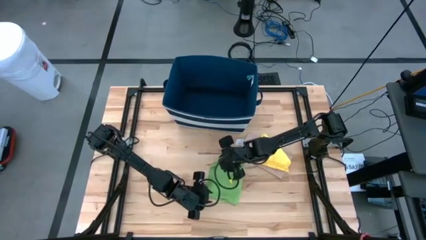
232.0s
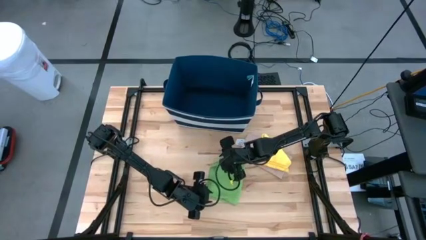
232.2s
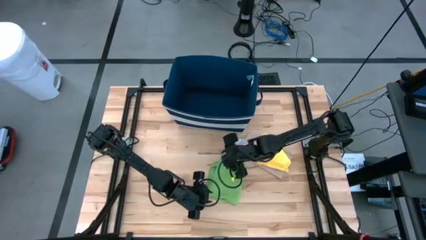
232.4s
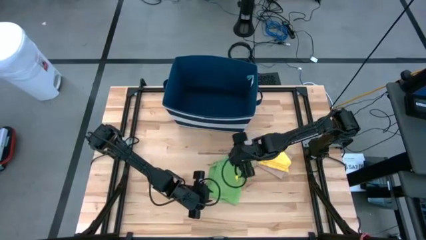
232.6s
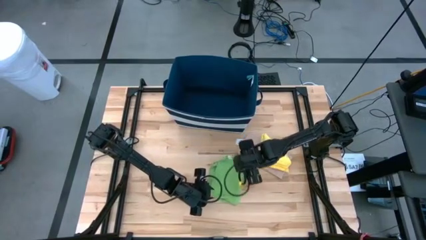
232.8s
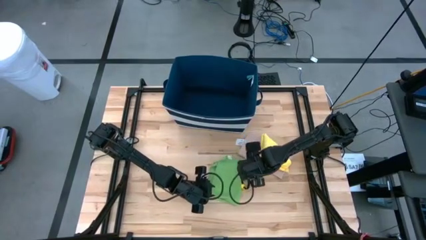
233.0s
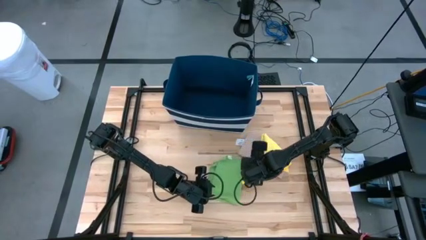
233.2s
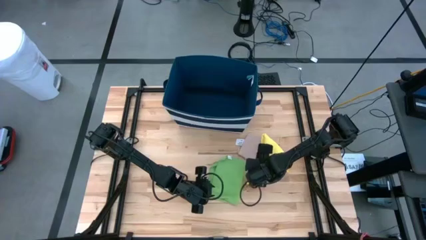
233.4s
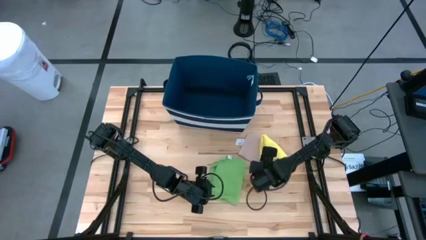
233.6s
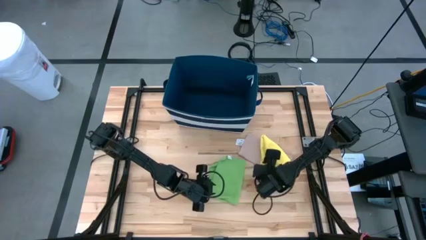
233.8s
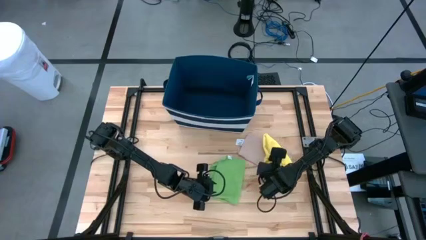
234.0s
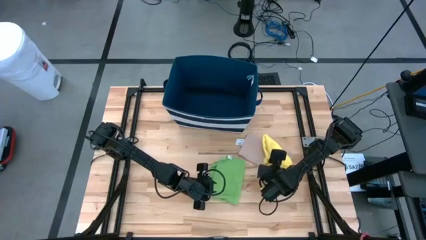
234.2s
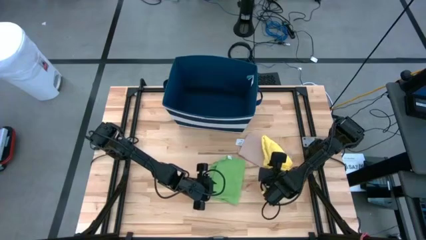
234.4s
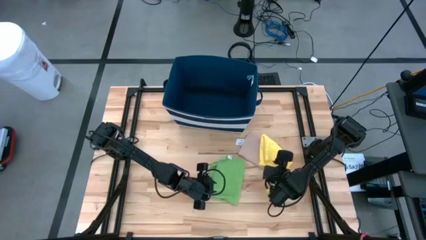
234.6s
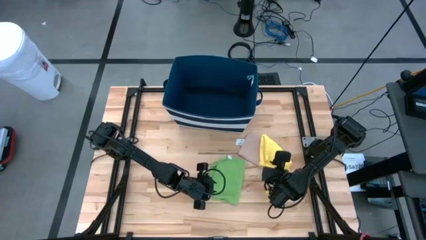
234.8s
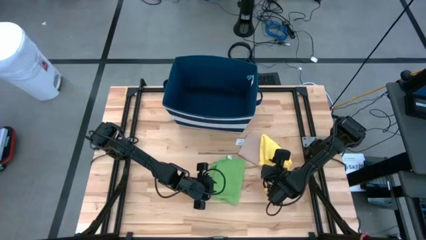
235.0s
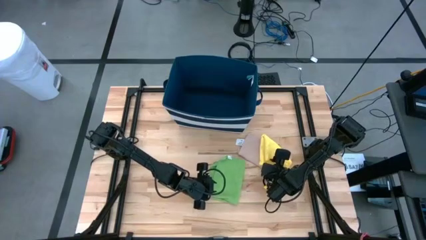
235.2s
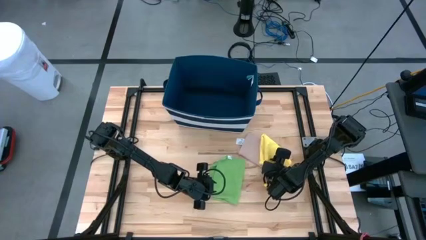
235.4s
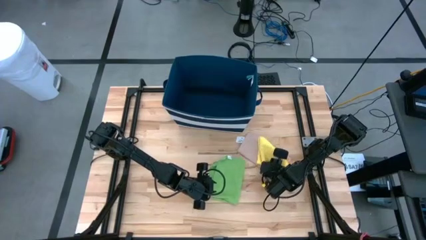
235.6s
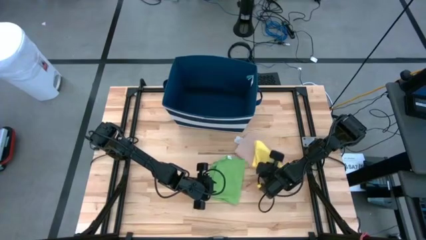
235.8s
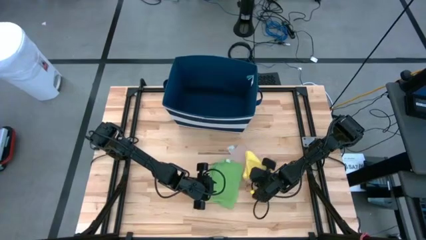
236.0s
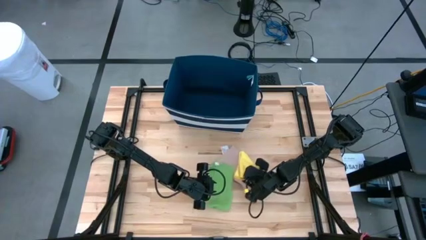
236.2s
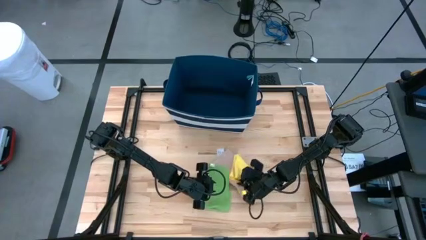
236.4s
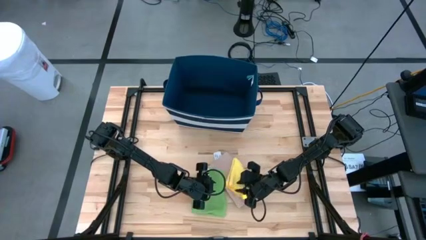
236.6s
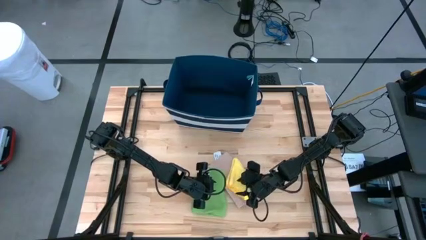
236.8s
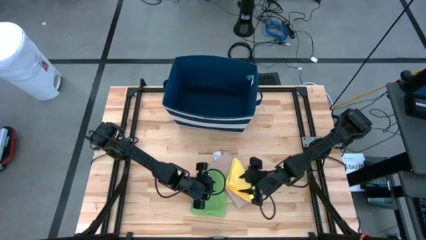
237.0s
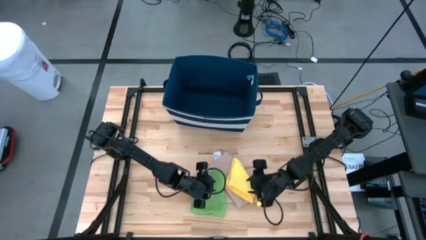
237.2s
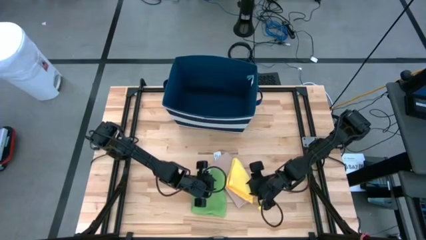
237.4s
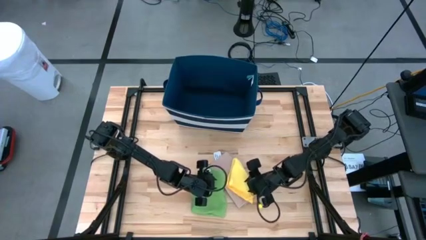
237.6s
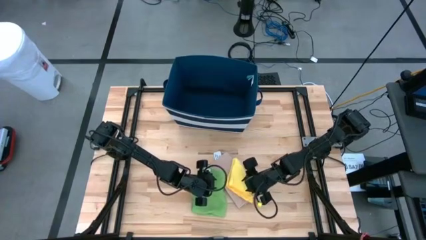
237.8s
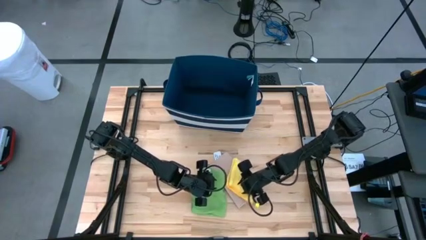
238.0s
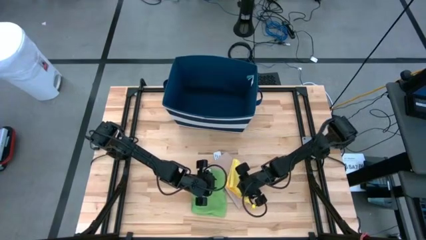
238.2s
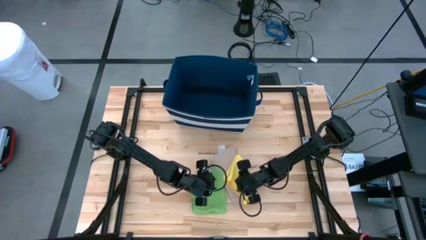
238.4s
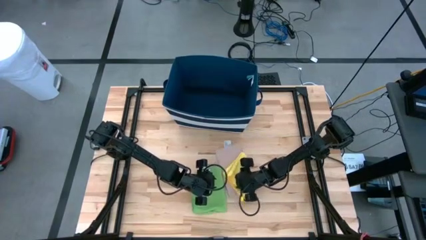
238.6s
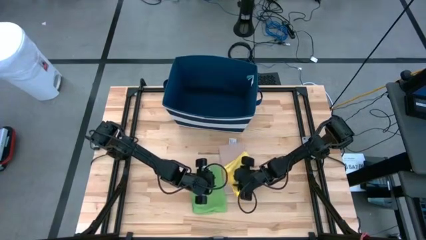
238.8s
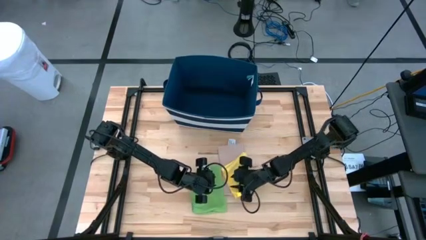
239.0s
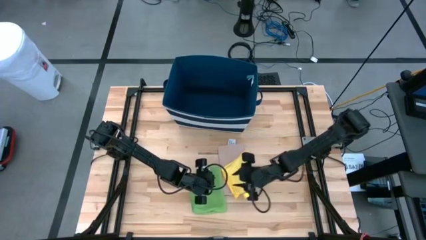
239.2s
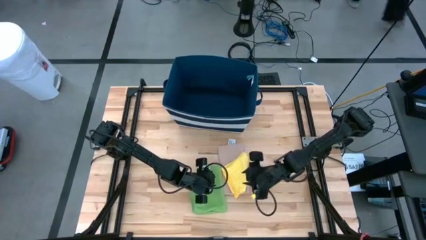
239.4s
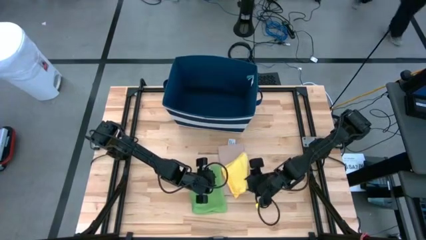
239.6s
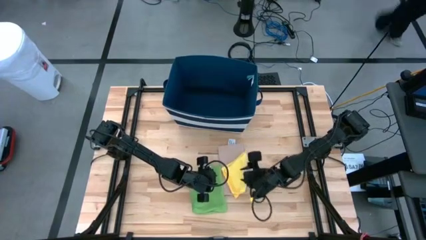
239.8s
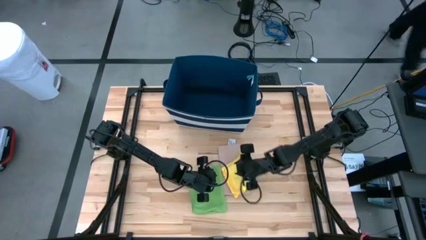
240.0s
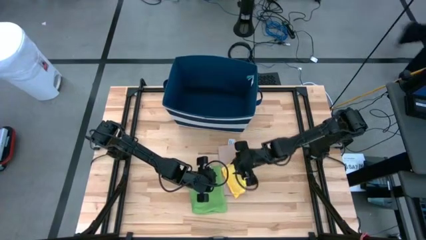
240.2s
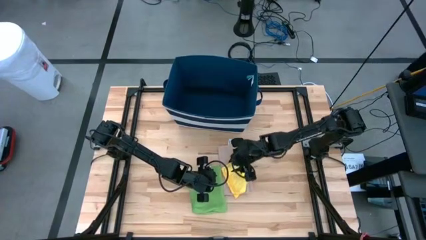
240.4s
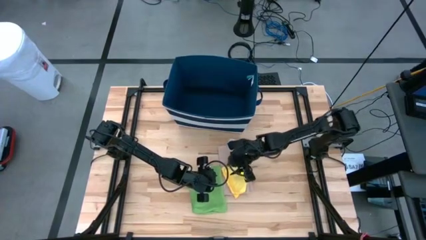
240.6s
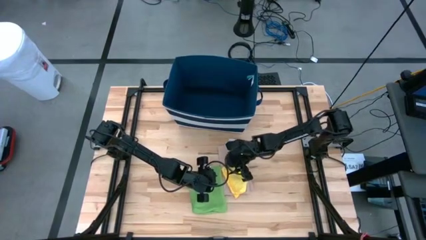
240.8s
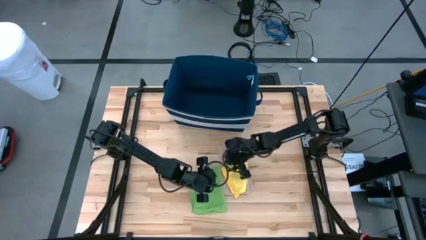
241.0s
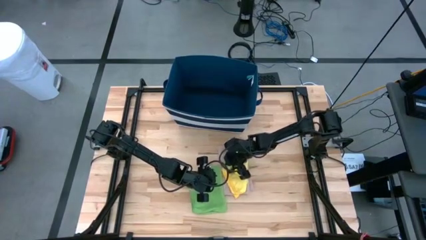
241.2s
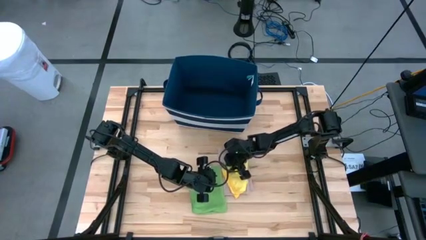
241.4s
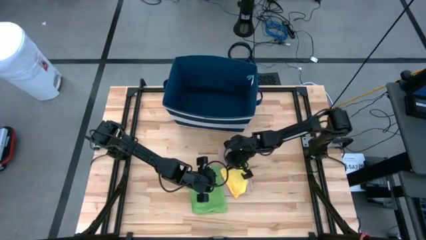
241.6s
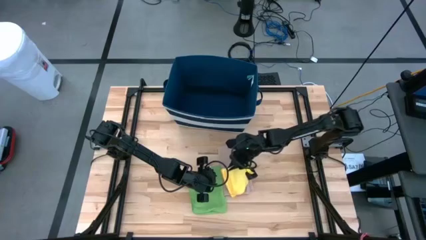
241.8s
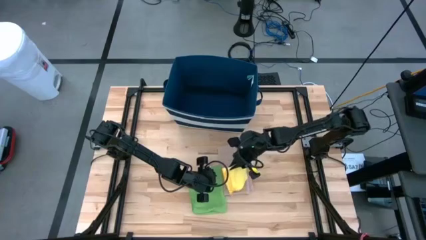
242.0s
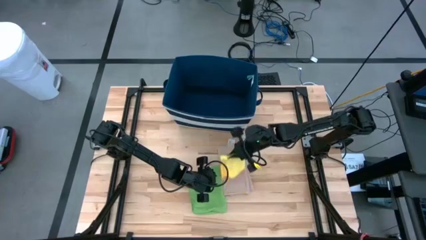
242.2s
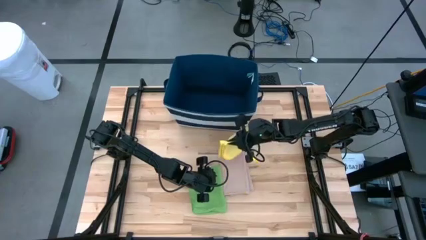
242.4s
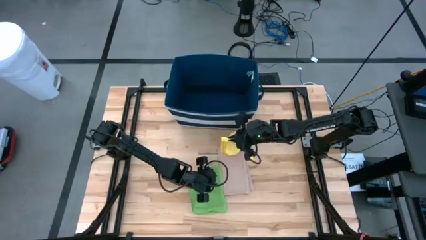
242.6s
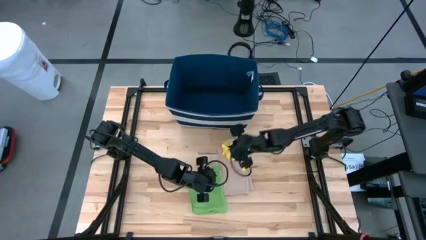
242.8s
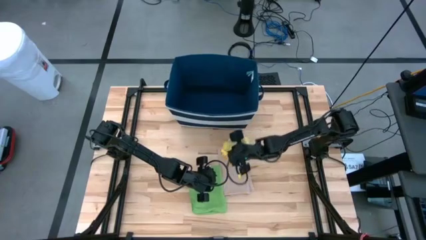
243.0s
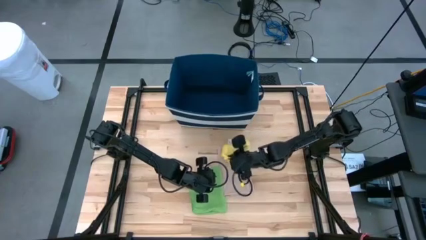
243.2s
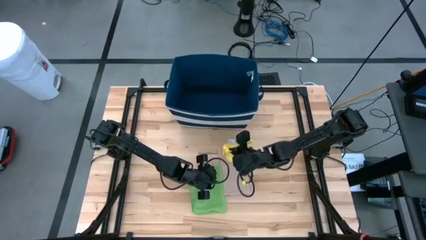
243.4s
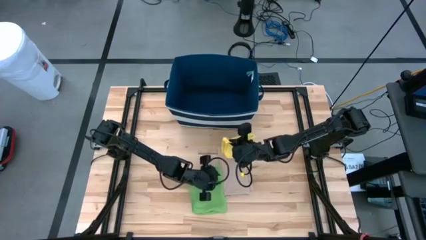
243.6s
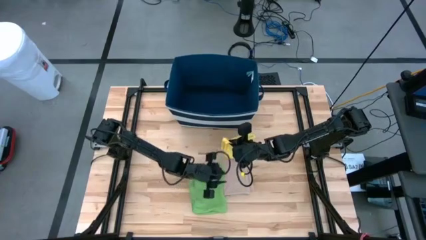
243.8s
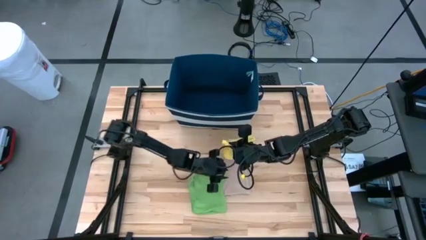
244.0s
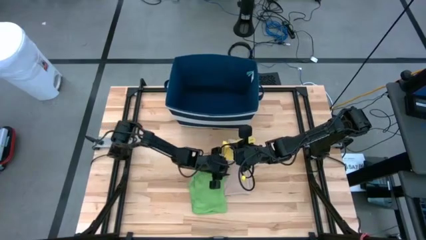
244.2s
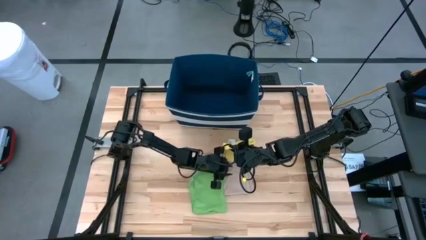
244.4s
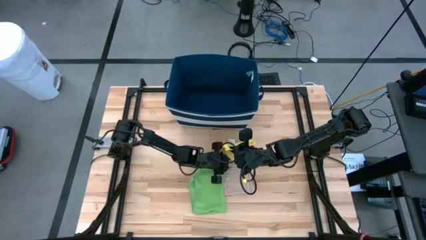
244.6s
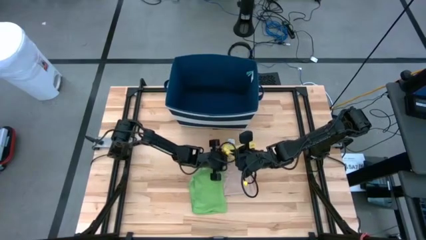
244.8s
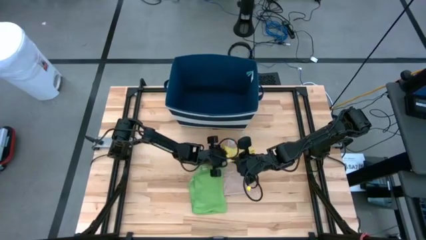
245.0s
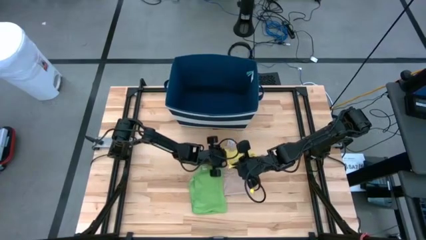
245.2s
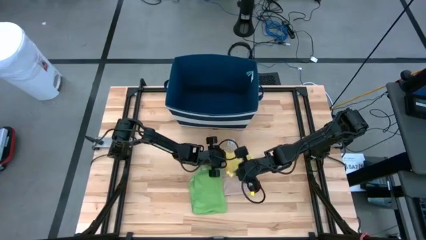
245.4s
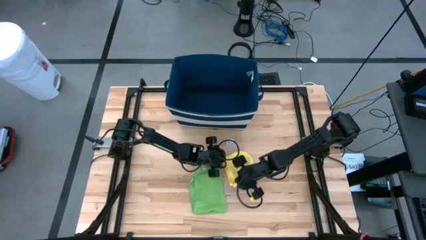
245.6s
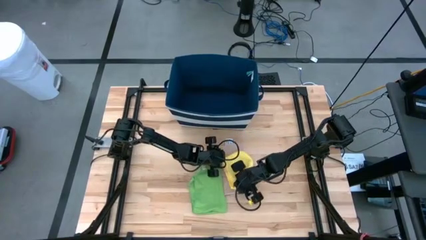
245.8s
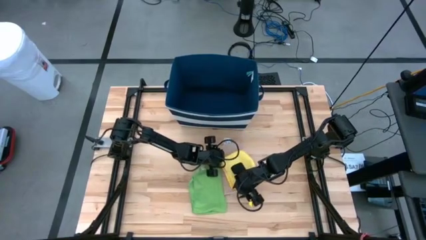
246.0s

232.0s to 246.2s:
Task: Fold towel
Adjust the stacked towels
